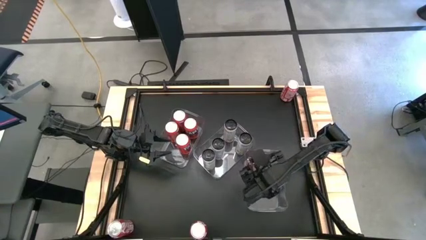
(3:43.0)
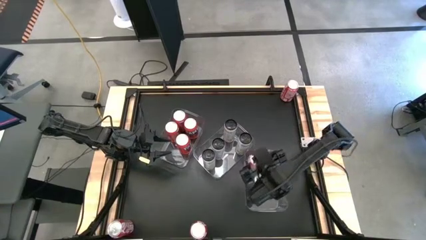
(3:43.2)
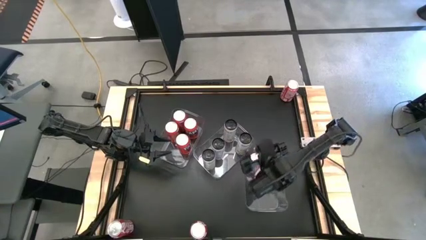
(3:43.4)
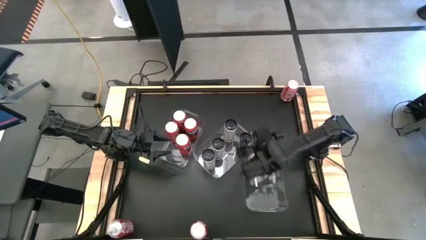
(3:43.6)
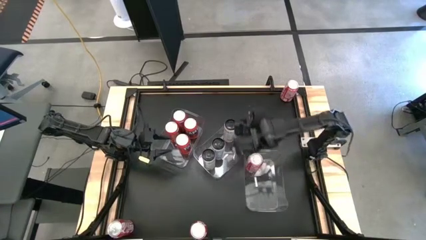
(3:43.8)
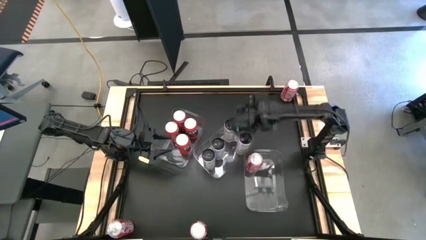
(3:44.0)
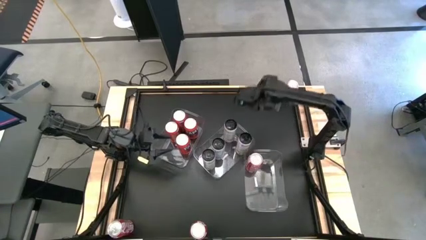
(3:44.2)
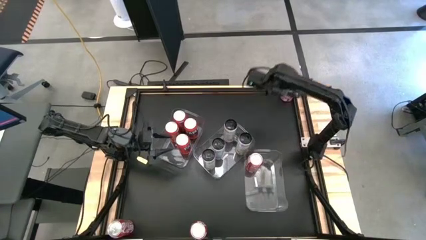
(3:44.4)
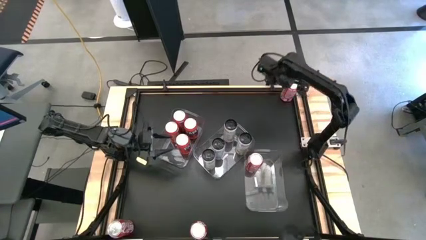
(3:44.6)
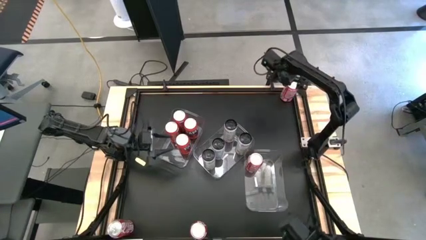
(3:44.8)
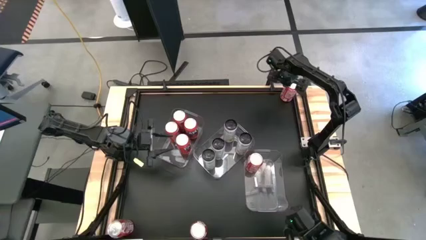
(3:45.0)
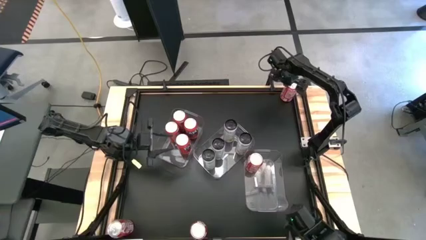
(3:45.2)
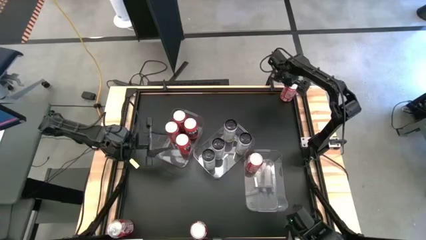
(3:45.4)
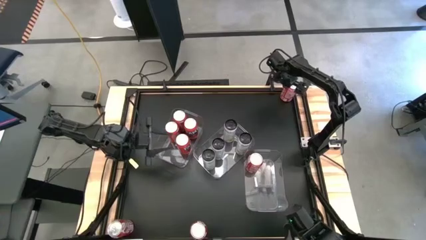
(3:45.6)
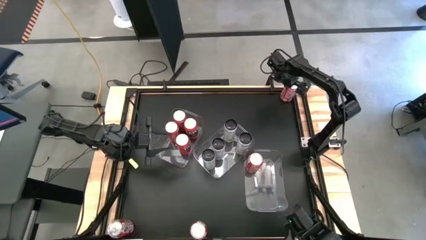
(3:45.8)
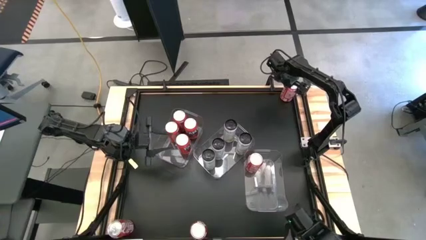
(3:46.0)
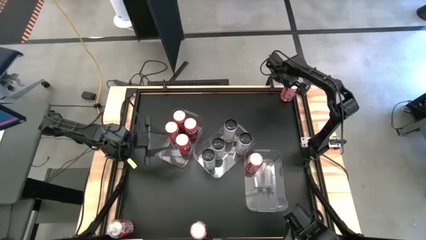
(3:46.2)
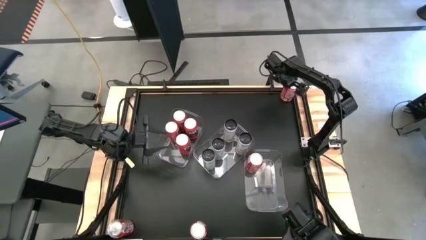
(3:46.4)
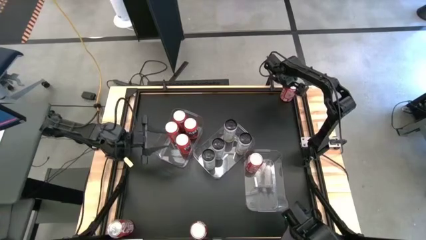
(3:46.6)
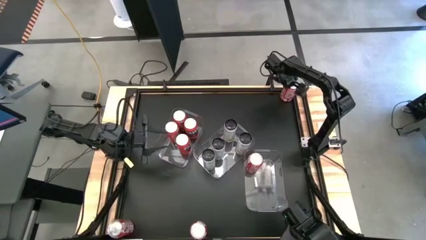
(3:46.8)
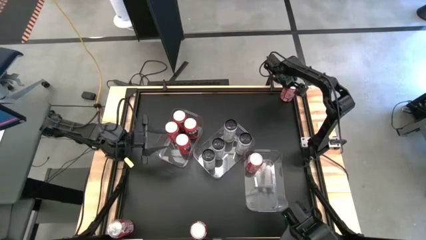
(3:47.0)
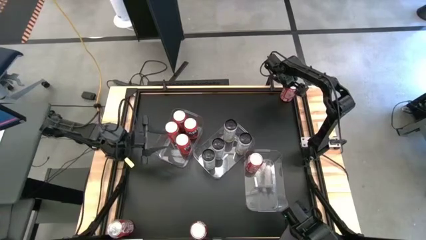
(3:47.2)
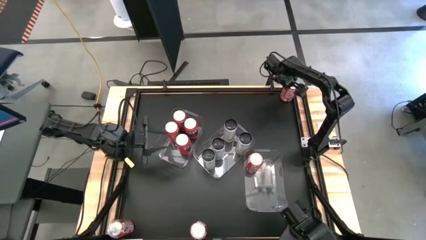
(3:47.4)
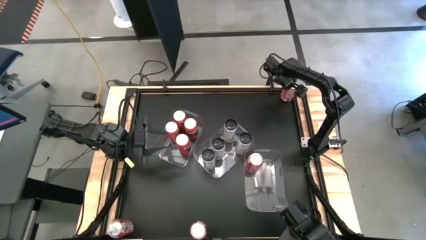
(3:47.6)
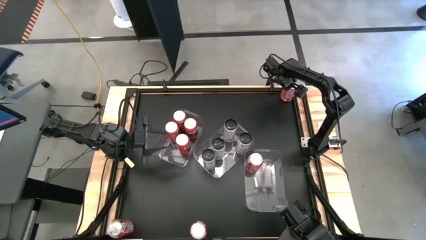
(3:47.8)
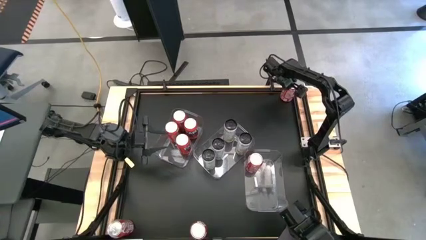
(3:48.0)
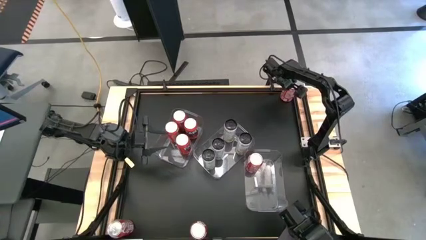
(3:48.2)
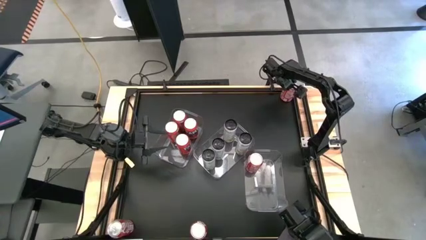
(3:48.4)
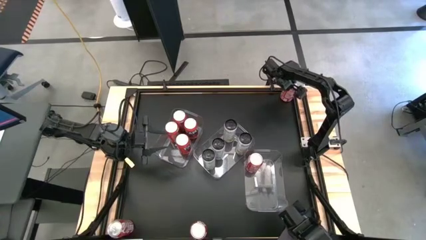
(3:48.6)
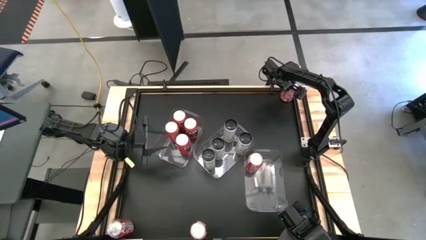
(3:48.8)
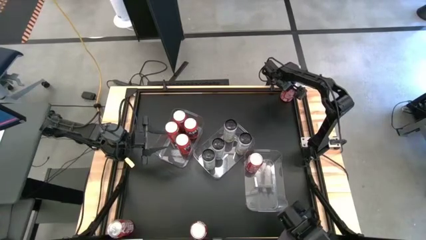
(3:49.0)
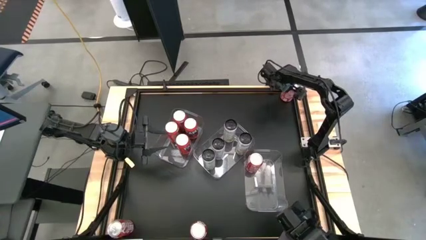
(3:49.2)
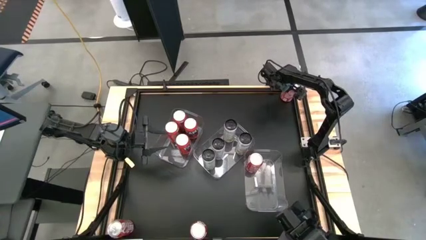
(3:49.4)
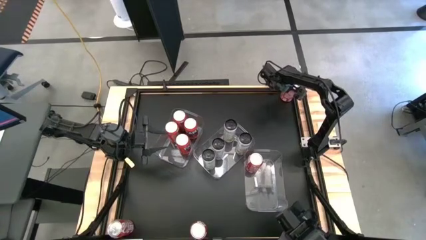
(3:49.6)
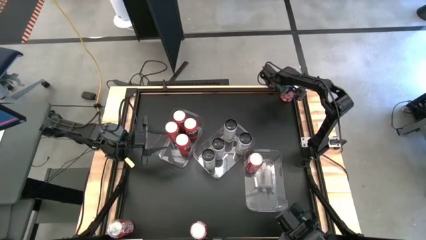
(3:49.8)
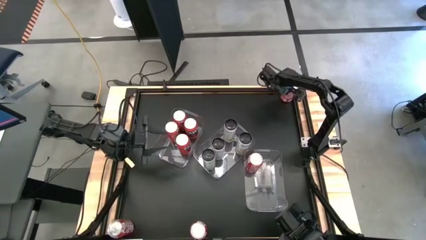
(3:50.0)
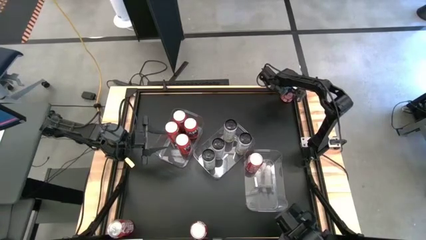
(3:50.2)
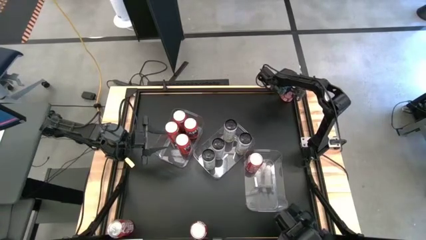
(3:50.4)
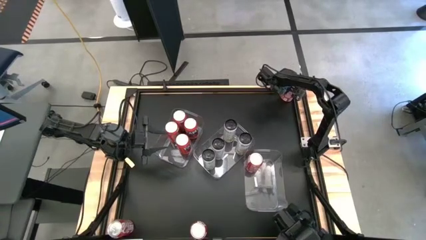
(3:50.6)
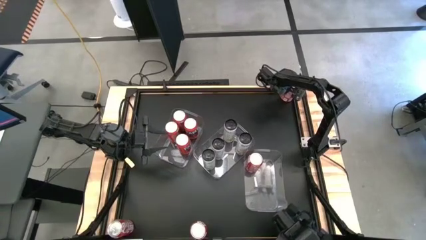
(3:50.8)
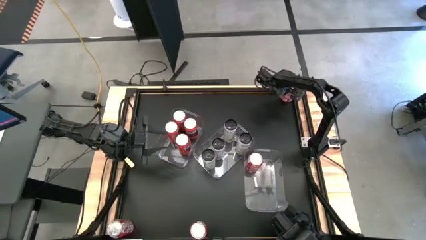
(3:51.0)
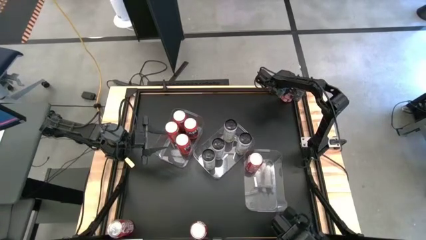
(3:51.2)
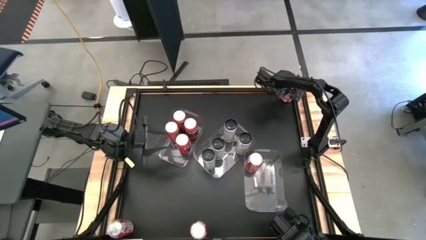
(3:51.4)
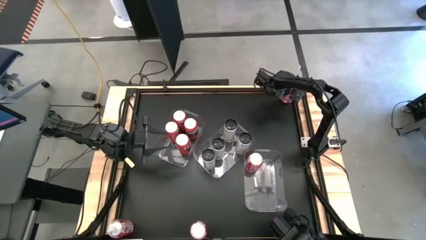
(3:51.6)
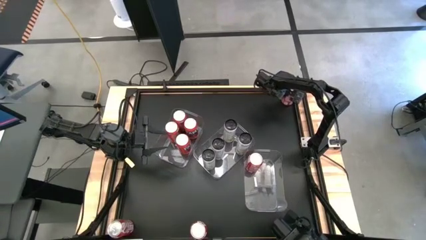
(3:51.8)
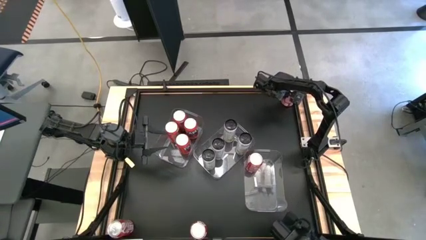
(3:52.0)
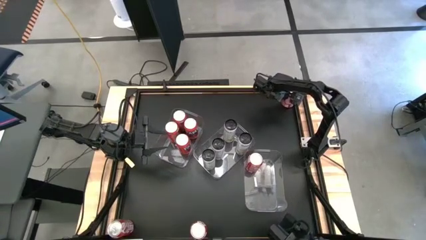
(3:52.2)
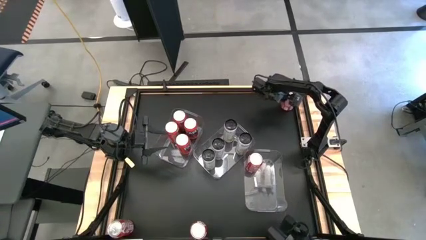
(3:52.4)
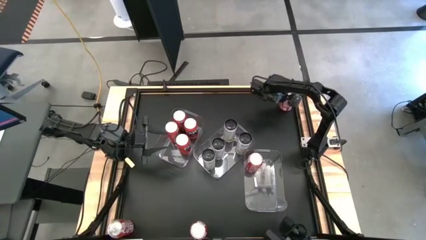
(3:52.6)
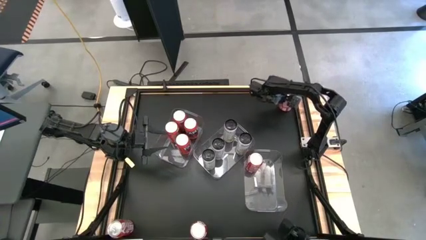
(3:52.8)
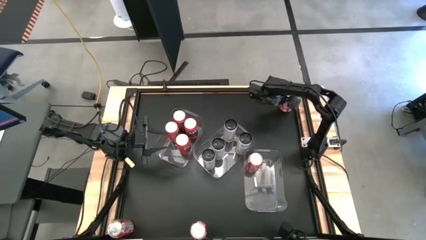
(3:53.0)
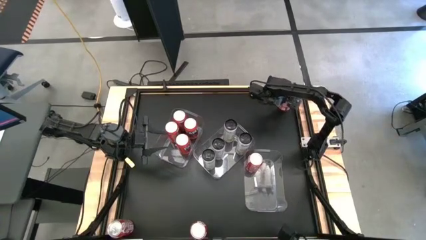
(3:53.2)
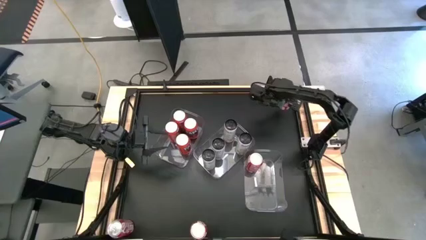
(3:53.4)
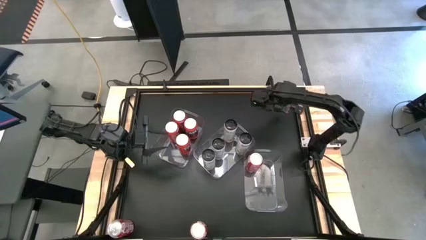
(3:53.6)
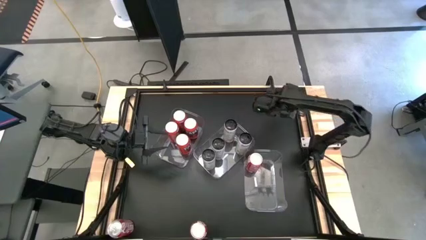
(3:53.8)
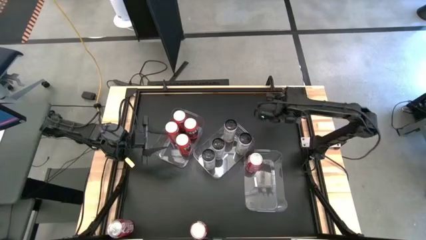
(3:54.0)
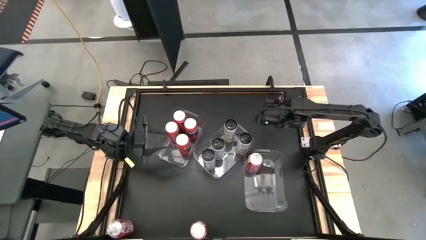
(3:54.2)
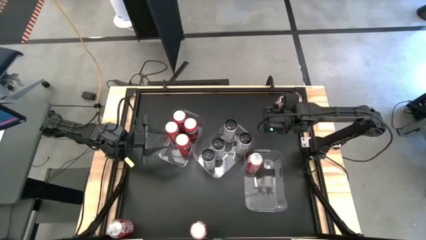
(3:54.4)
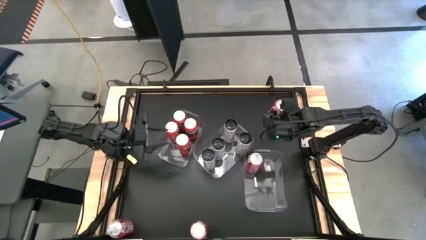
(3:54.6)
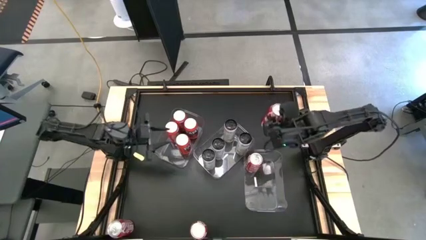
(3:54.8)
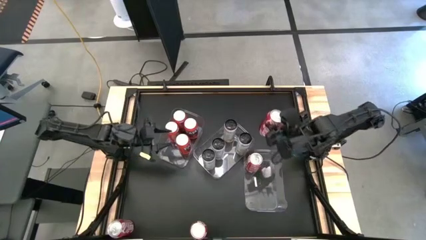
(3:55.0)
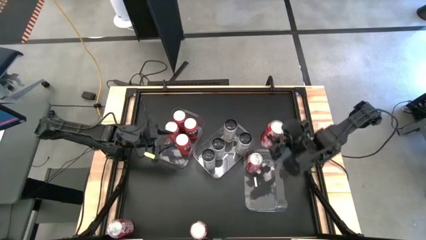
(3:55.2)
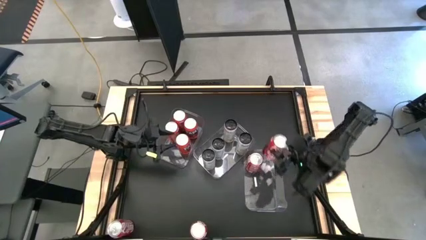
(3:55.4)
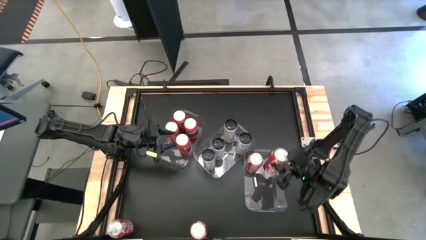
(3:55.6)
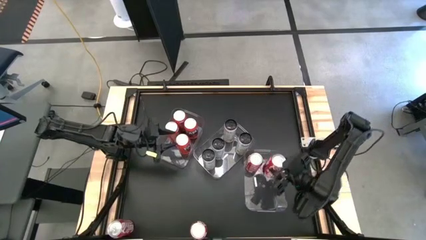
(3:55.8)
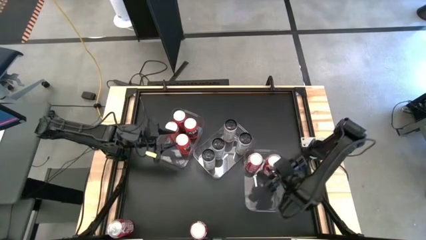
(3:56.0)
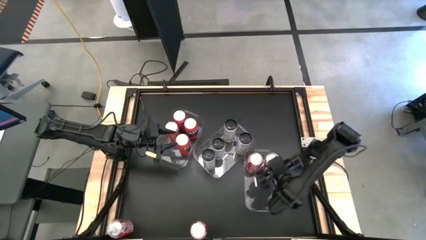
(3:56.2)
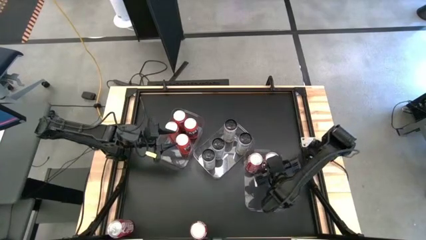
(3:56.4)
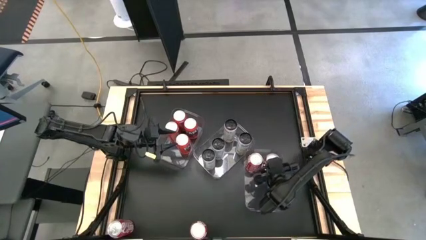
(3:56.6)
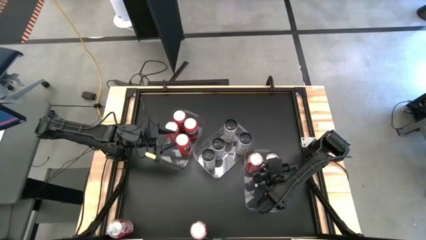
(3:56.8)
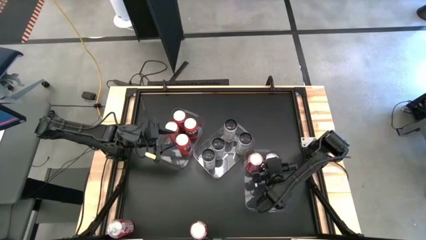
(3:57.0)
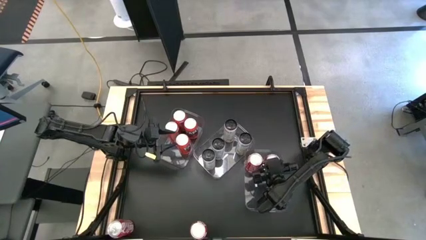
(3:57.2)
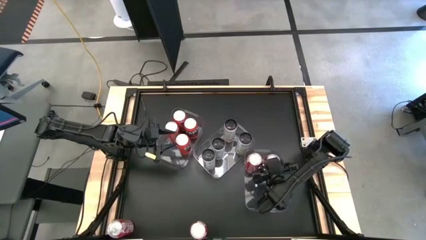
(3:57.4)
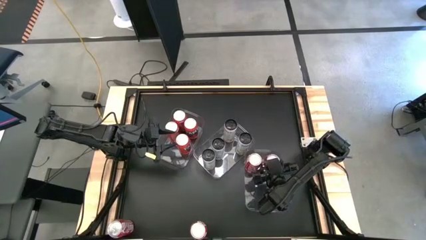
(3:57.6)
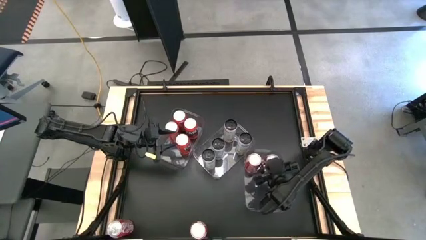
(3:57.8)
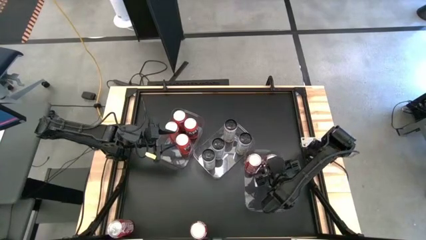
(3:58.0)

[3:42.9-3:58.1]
Task: Sort soda cans
Put the red soda can into the right transparent bin
